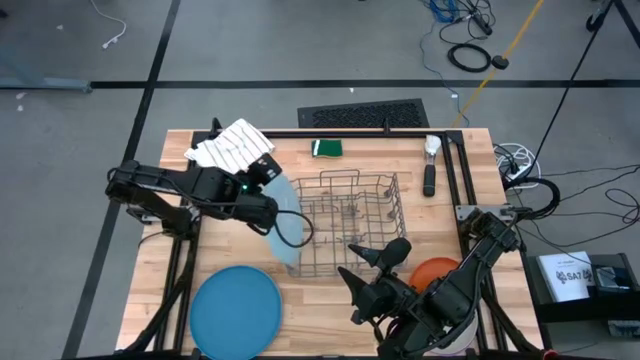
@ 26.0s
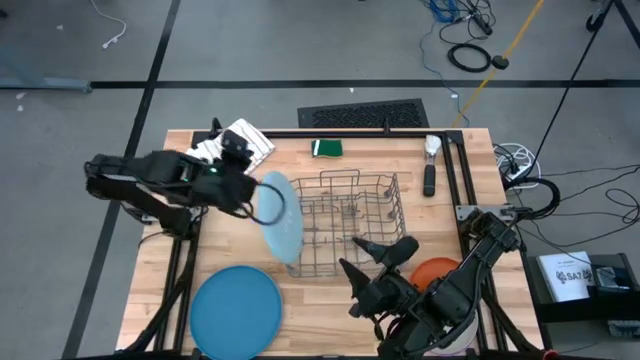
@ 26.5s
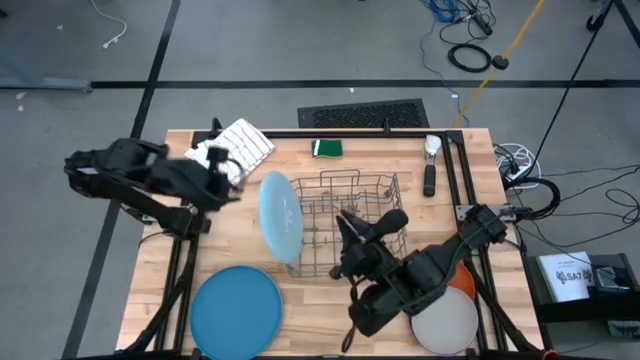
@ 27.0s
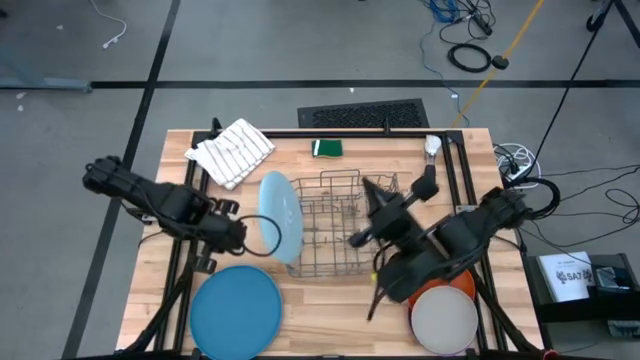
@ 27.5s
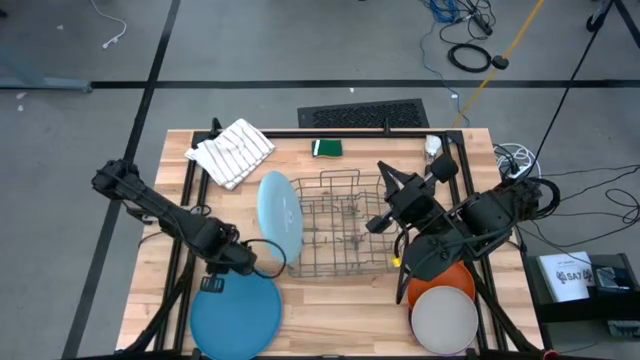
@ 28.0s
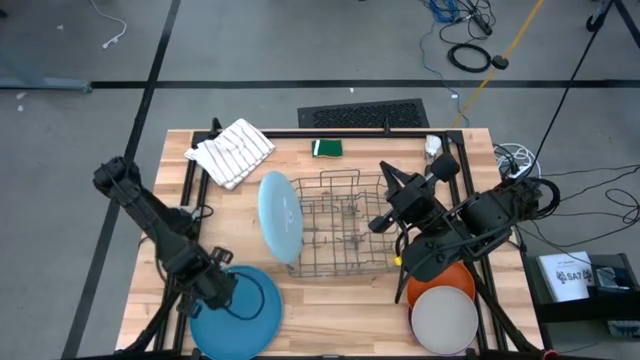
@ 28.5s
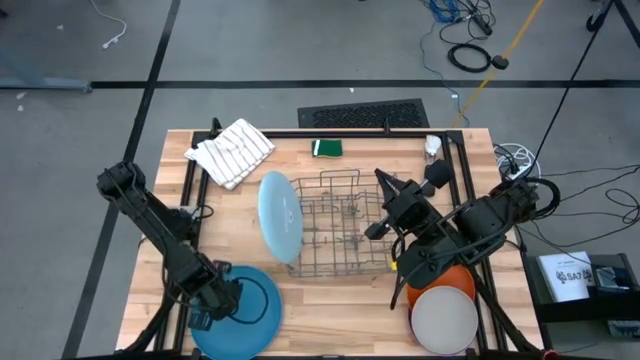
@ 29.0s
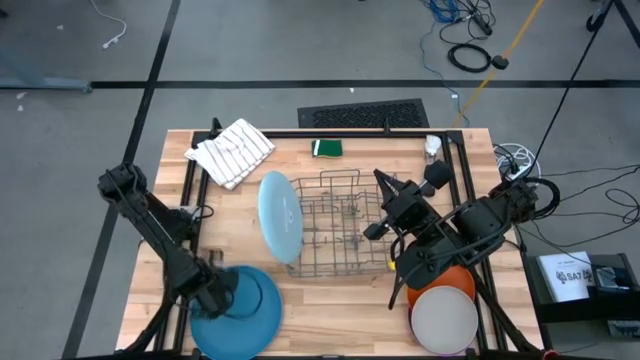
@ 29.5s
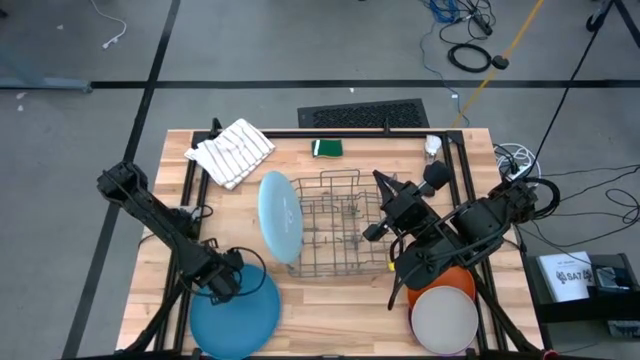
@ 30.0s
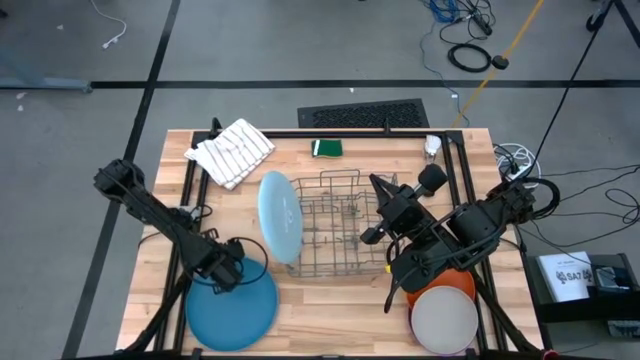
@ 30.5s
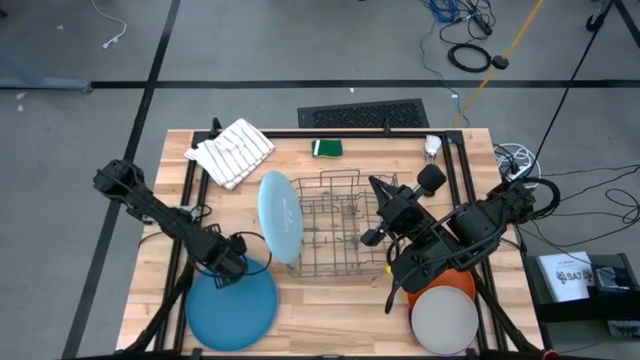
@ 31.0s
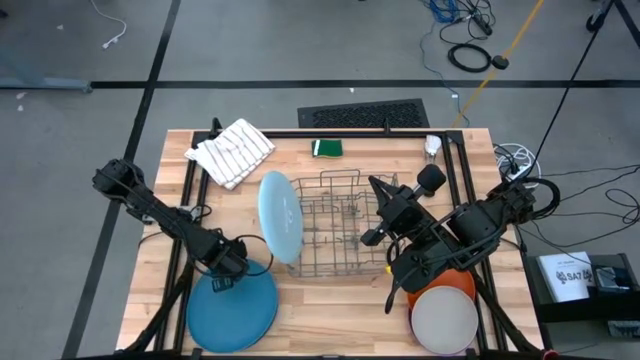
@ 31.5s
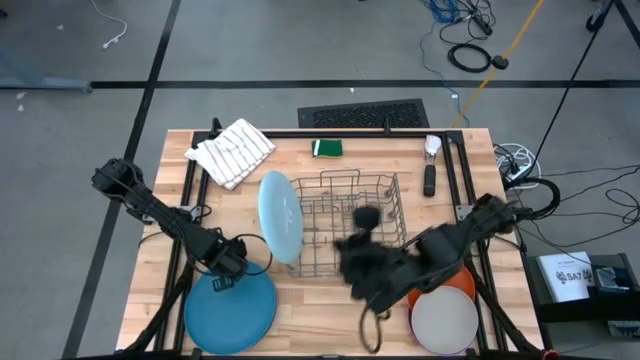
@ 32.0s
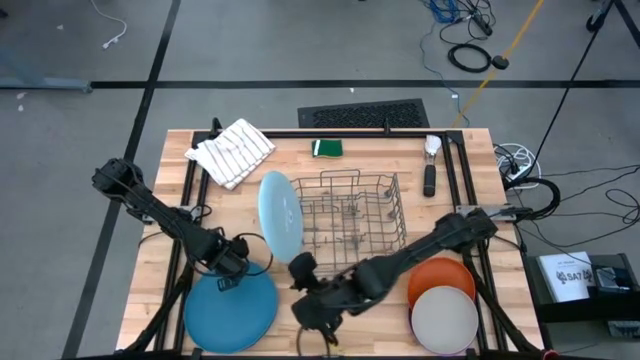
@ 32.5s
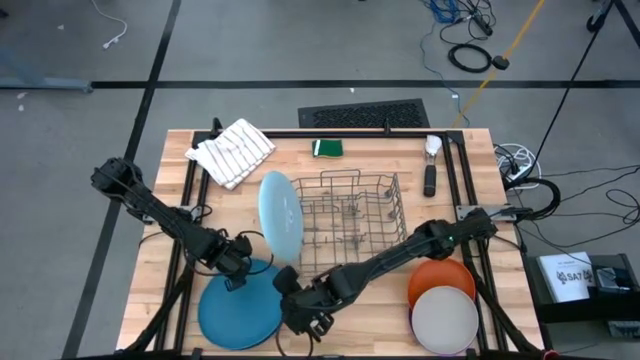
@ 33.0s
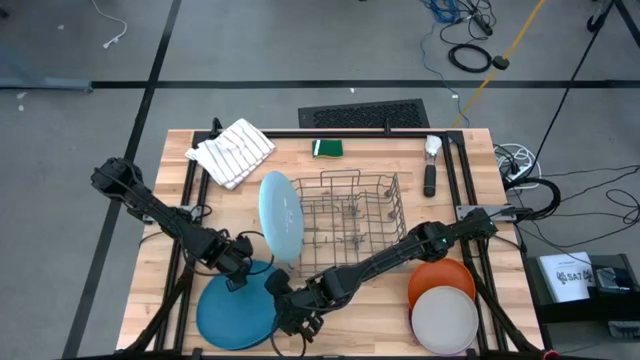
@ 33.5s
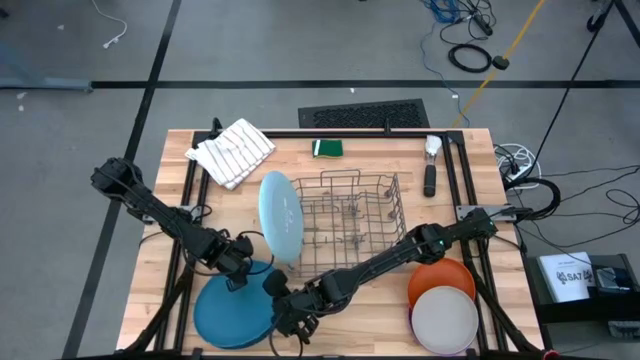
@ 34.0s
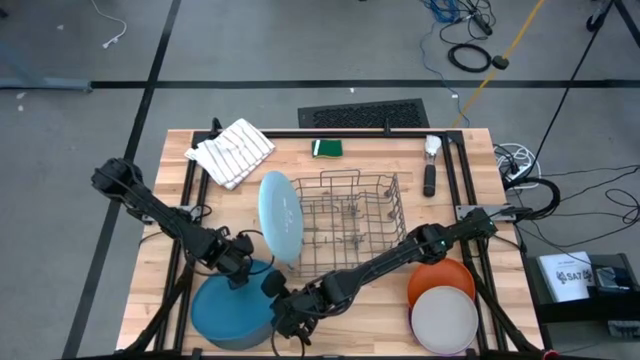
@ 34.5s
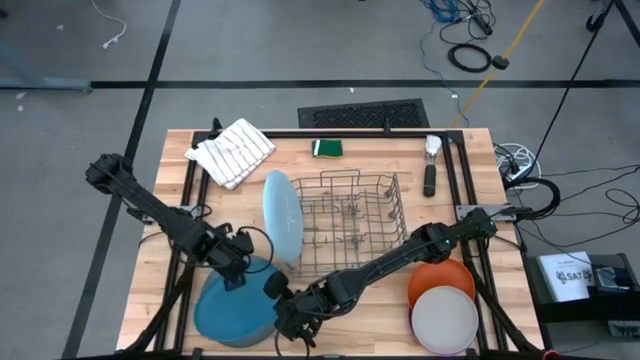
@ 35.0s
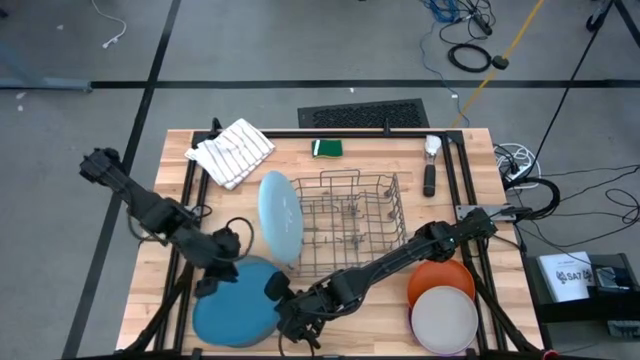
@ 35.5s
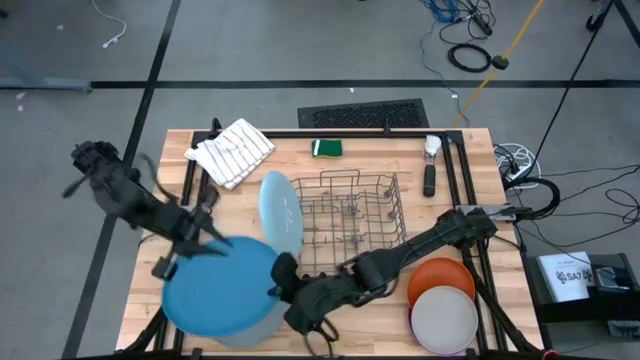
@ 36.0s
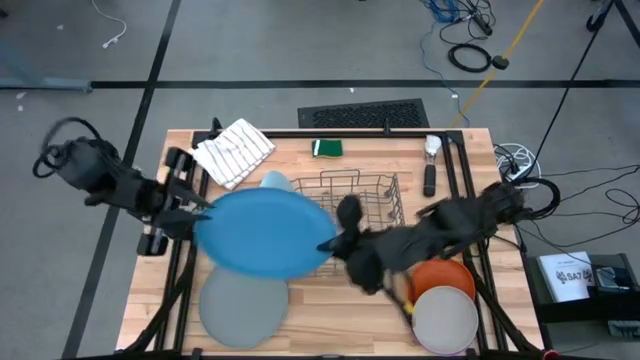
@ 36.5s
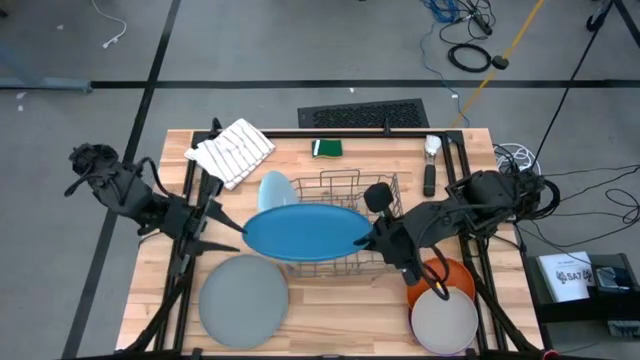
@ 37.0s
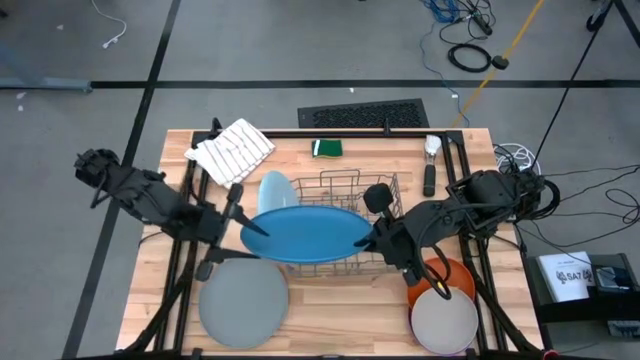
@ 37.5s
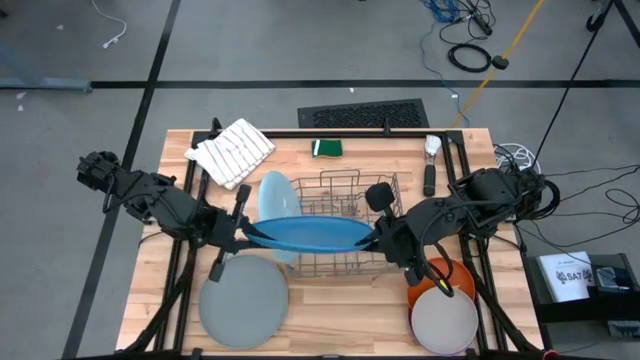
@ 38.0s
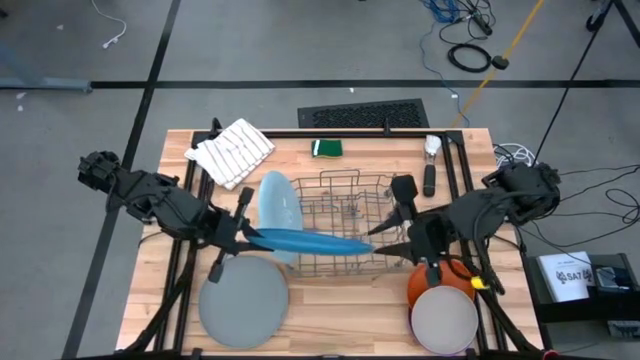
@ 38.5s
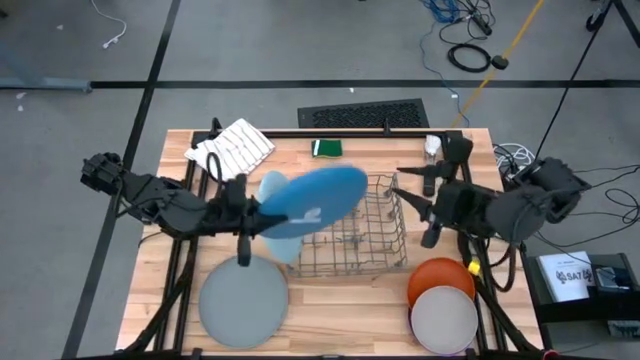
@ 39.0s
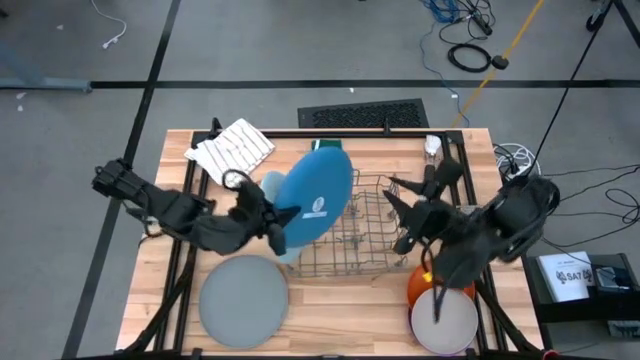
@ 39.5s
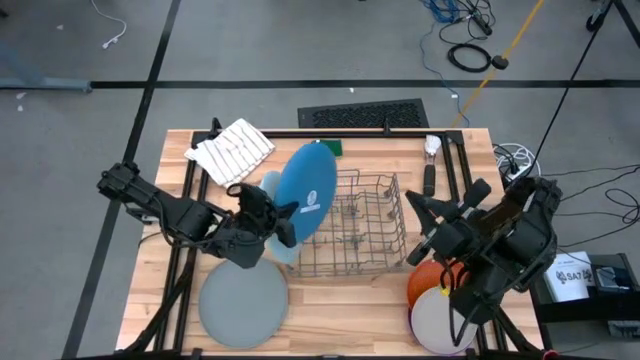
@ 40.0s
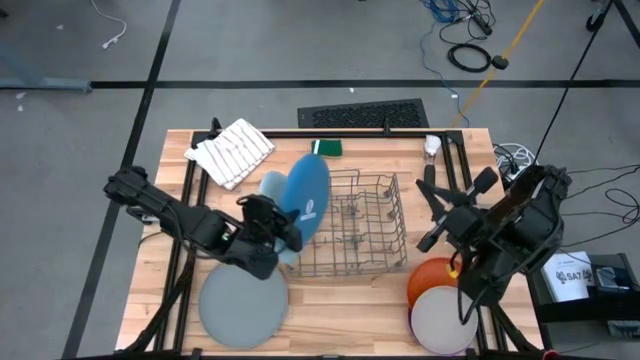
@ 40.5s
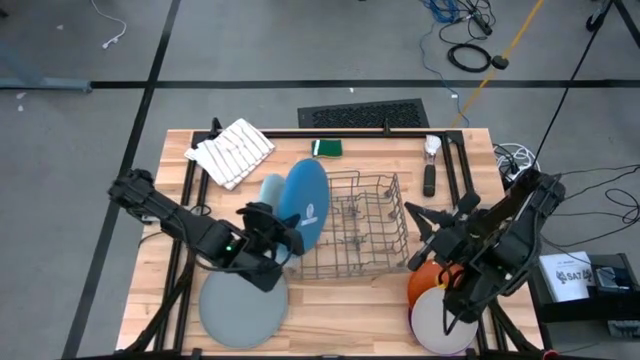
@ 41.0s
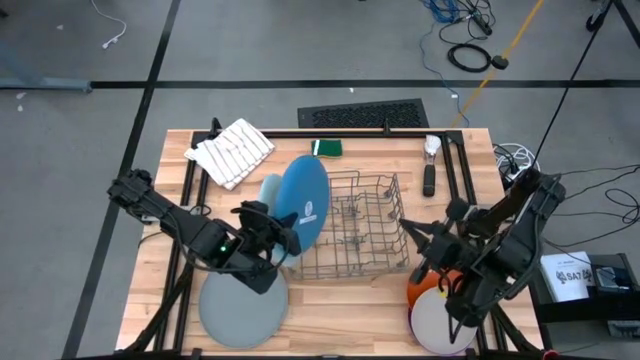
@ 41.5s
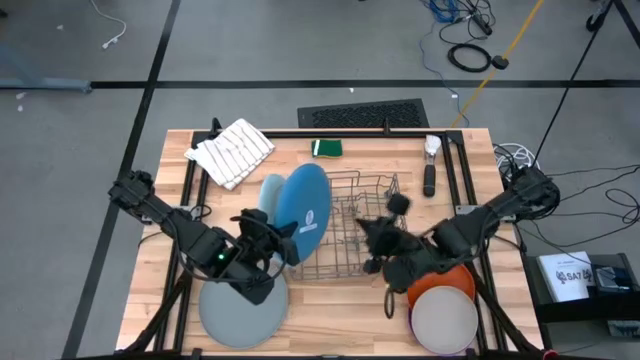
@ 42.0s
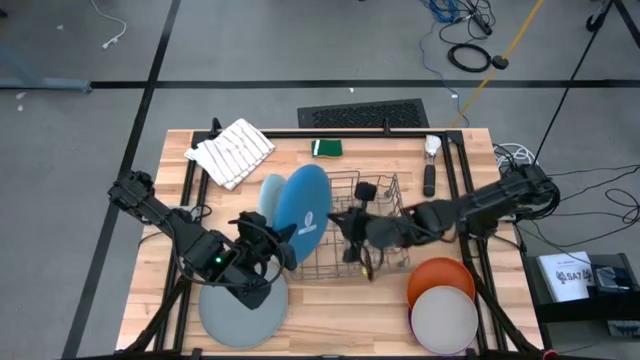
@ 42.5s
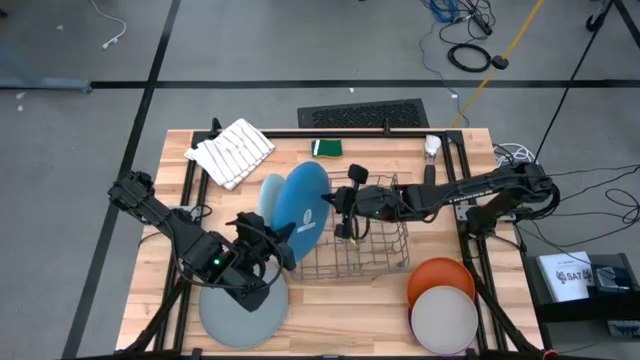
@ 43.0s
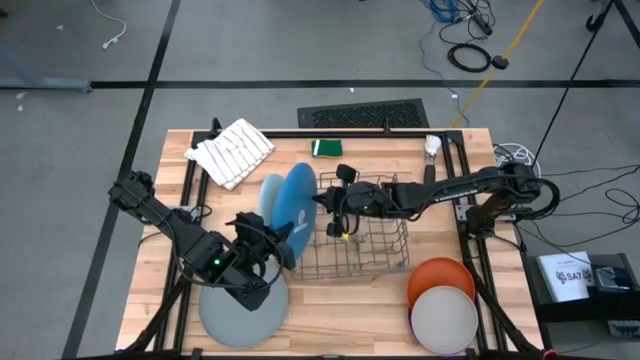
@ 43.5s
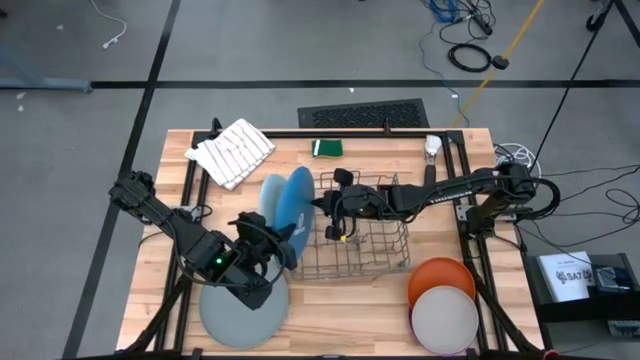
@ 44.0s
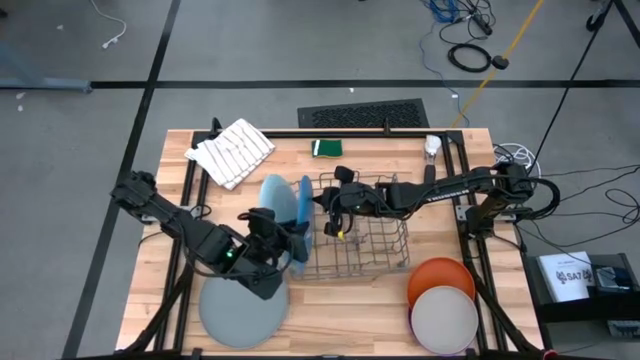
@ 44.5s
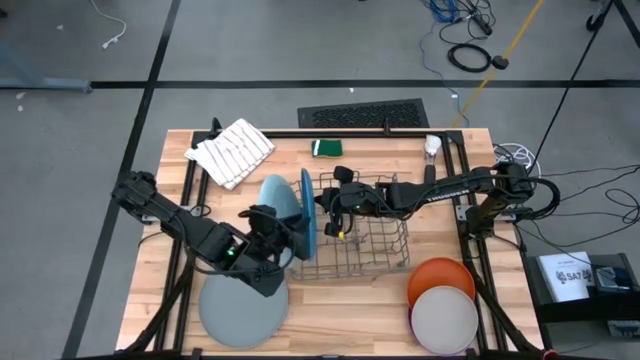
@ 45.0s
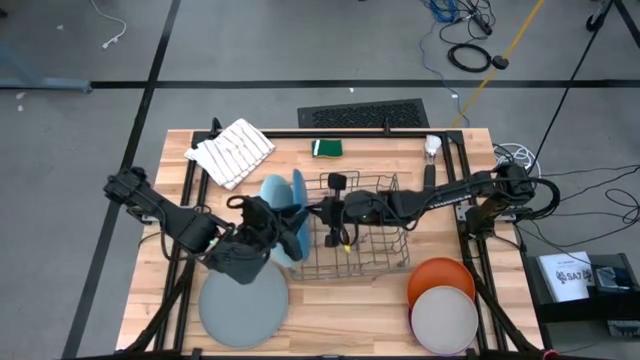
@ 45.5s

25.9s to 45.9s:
Task: Sort dishes
Put the blue plate into the dish rack

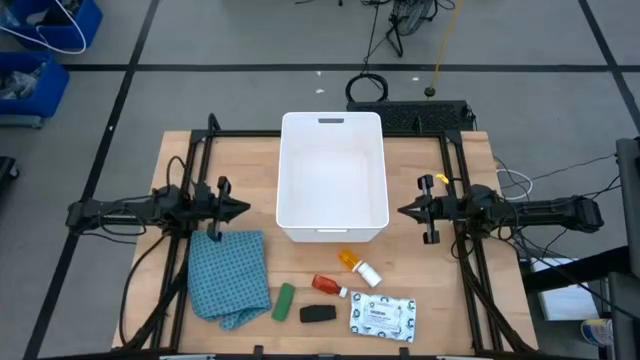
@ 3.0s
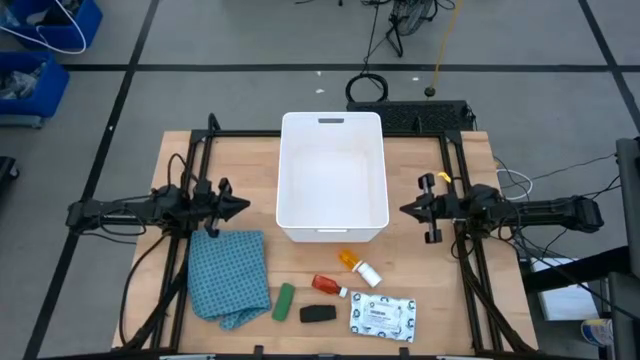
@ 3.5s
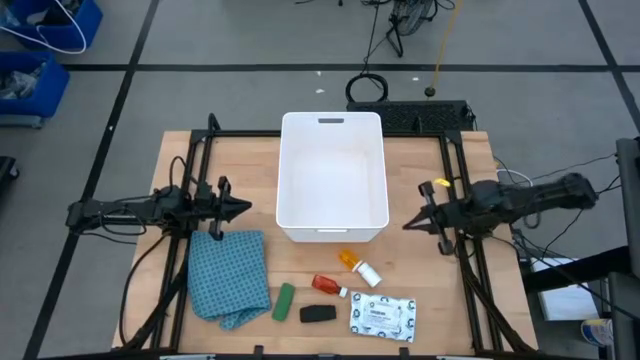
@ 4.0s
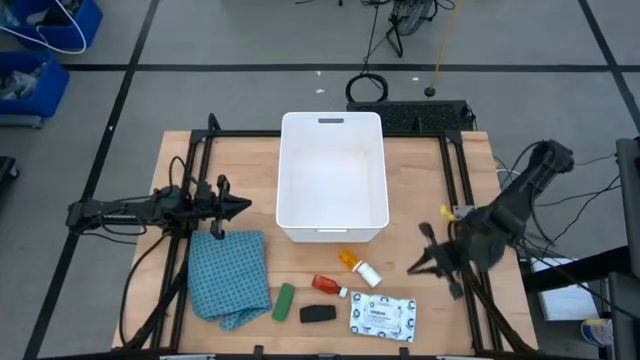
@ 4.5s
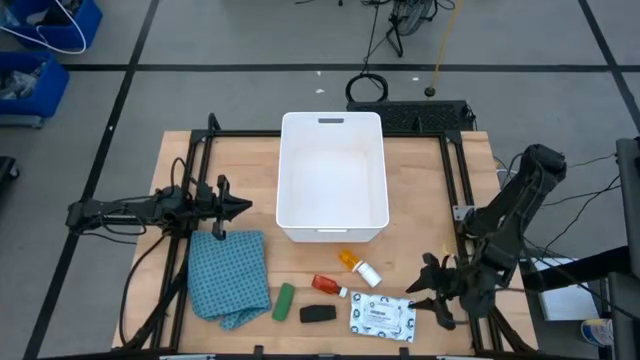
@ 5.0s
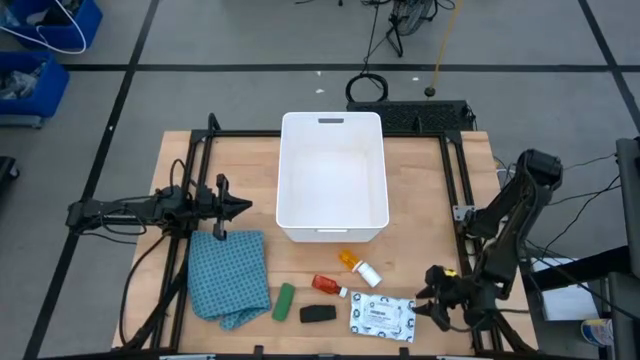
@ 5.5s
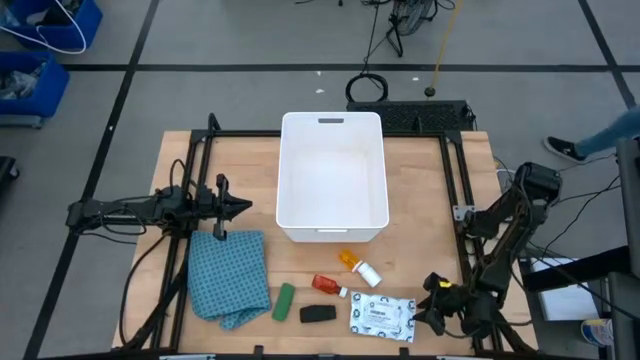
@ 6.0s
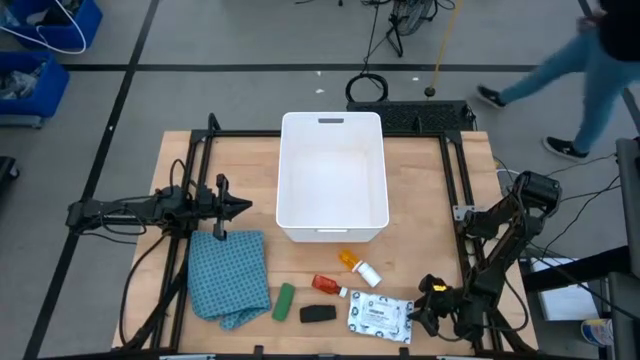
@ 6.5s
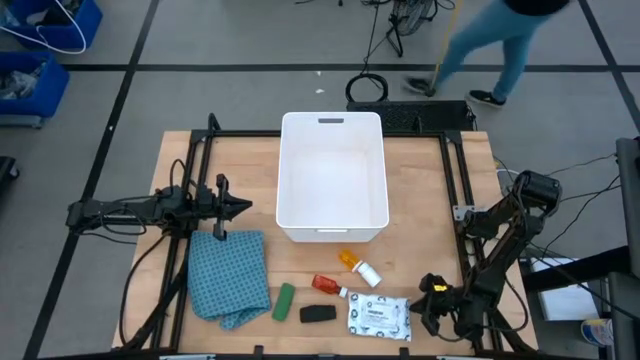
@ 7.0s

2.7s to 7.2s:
Task: Pick & place medical supplies in basket/bin
Put the mailer bag into the white bin
